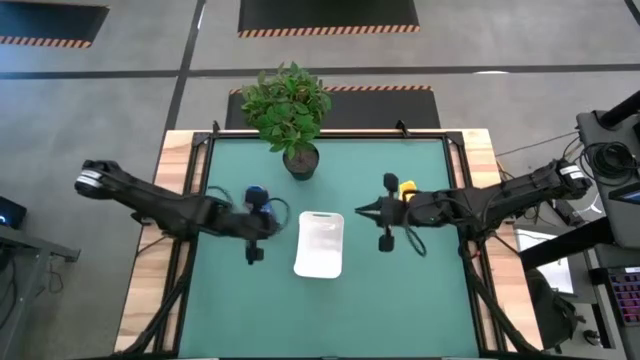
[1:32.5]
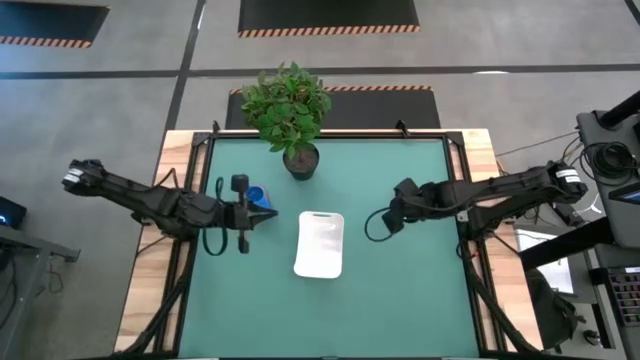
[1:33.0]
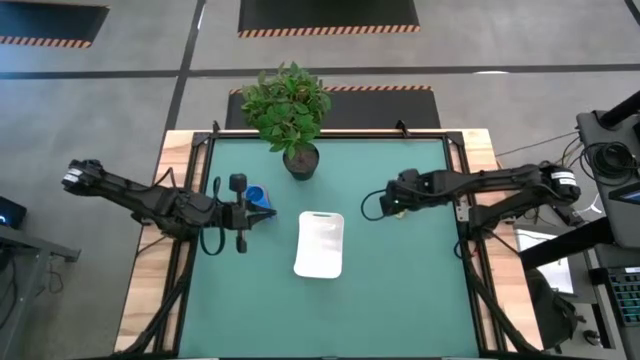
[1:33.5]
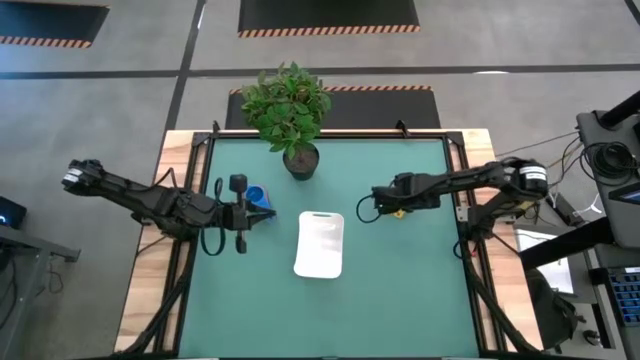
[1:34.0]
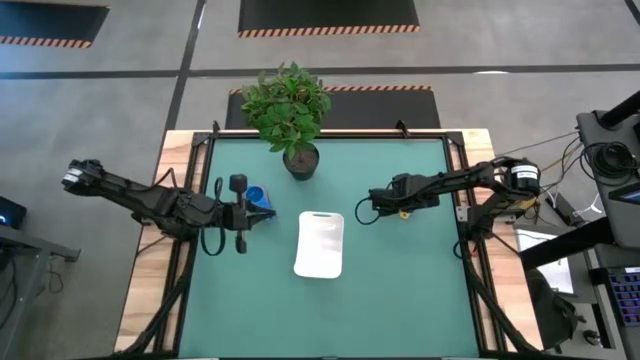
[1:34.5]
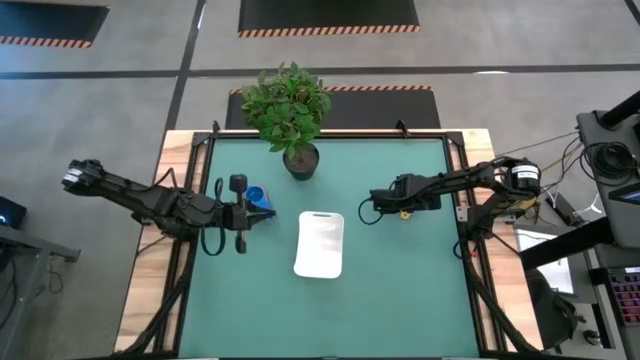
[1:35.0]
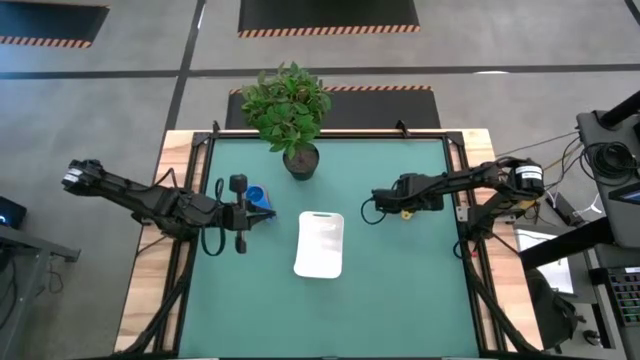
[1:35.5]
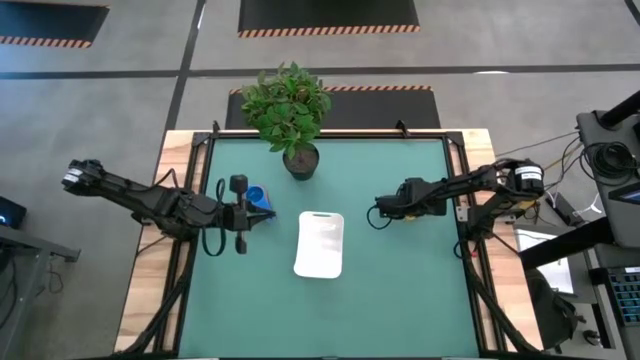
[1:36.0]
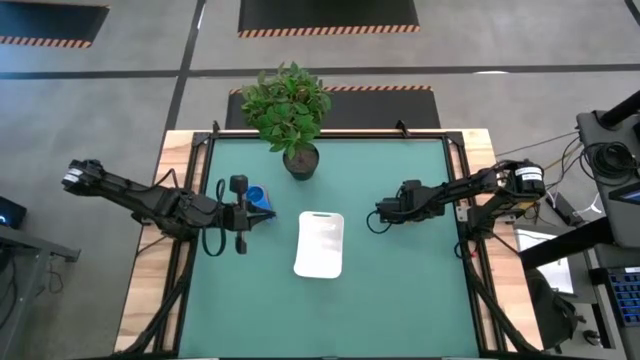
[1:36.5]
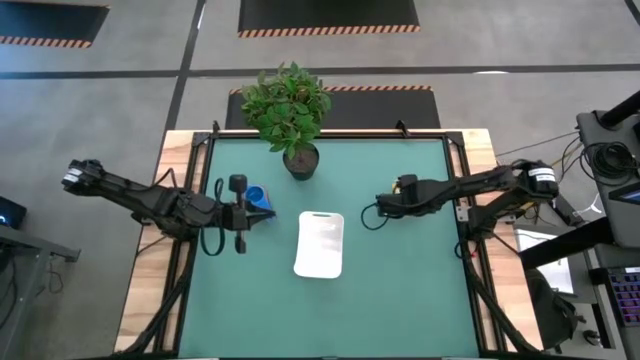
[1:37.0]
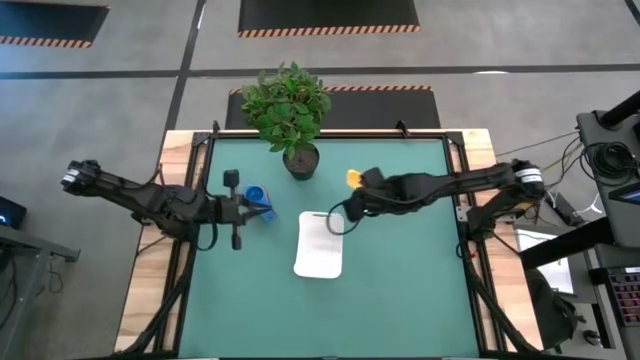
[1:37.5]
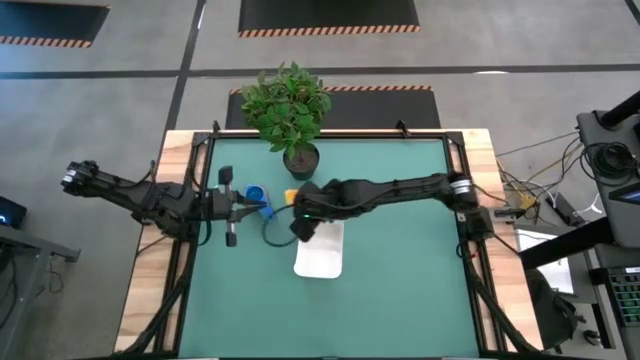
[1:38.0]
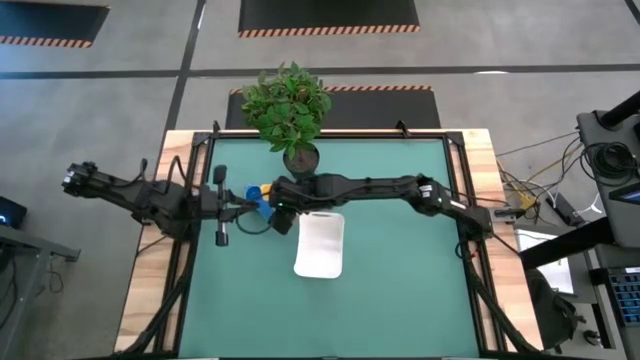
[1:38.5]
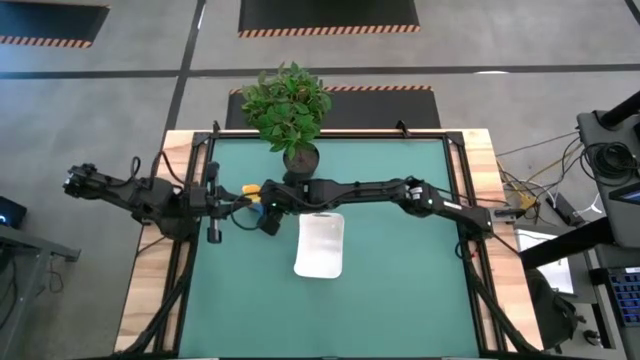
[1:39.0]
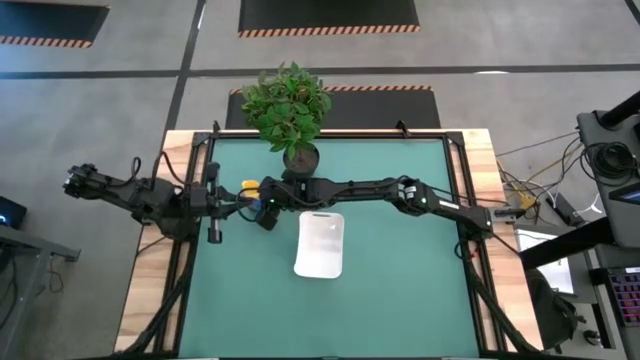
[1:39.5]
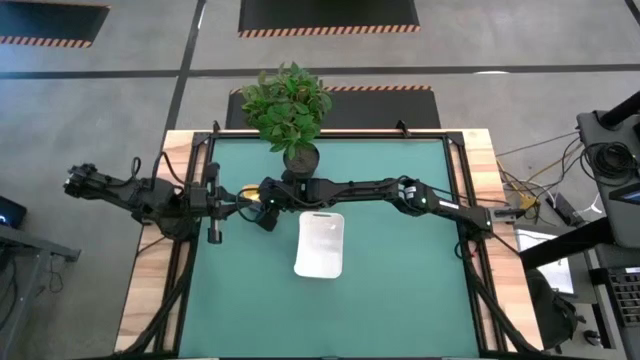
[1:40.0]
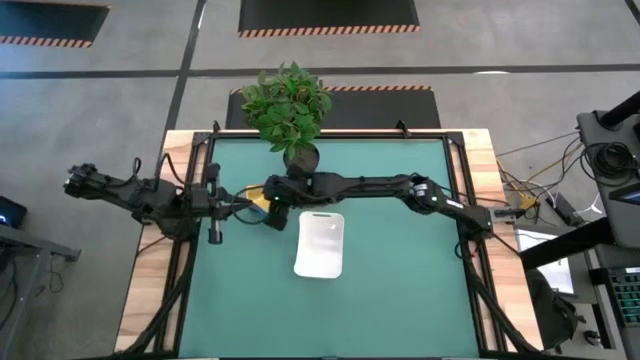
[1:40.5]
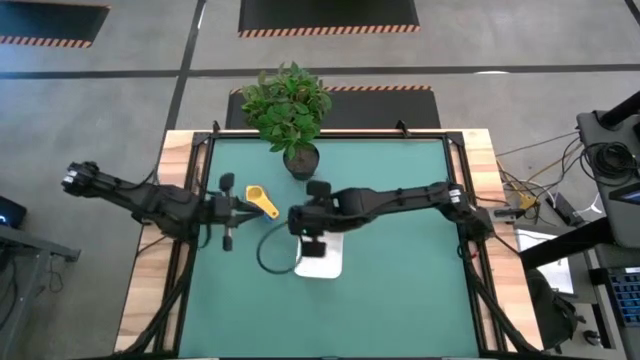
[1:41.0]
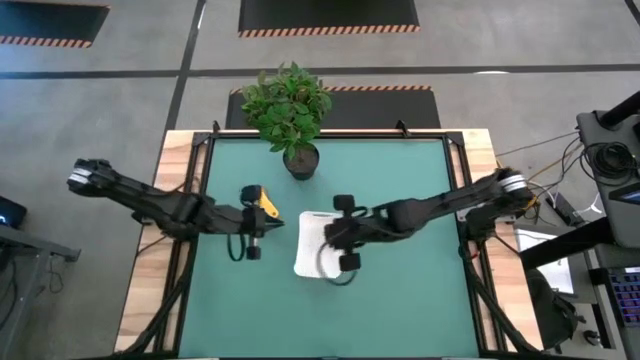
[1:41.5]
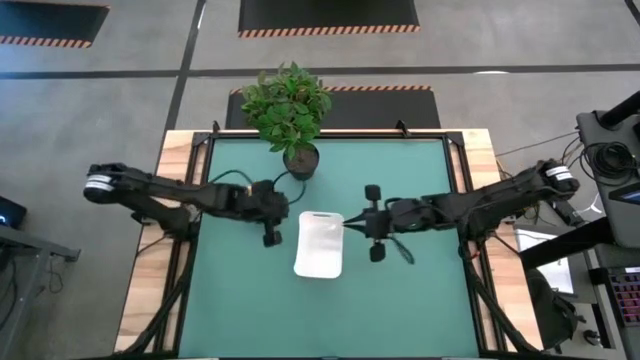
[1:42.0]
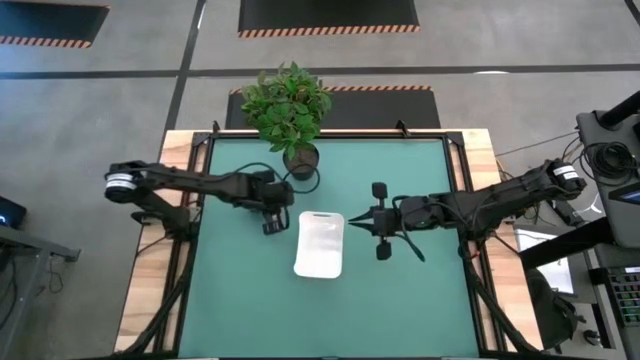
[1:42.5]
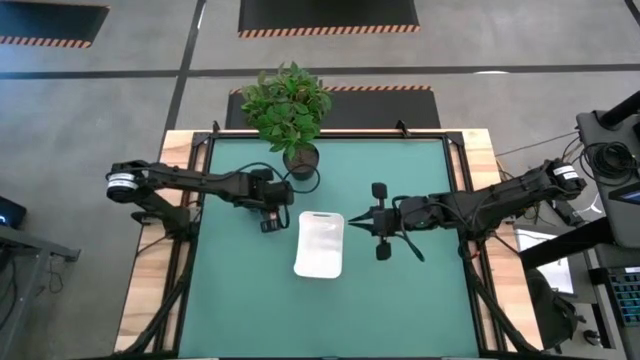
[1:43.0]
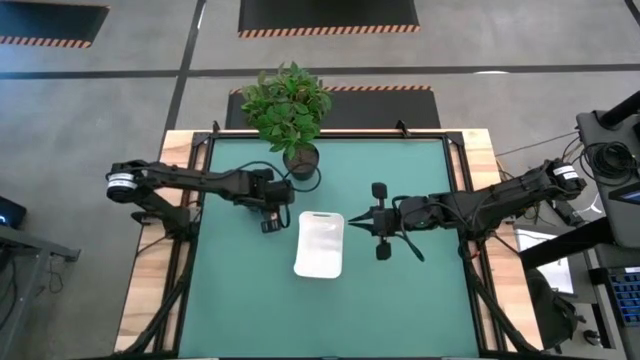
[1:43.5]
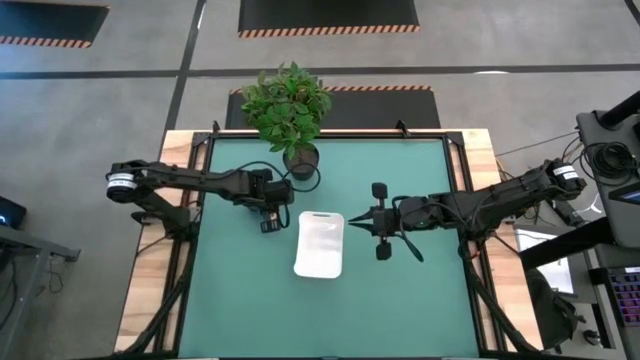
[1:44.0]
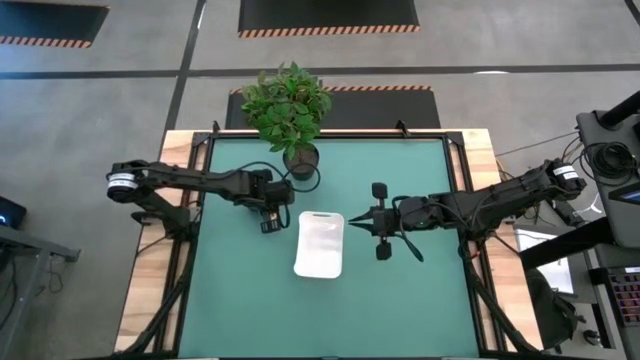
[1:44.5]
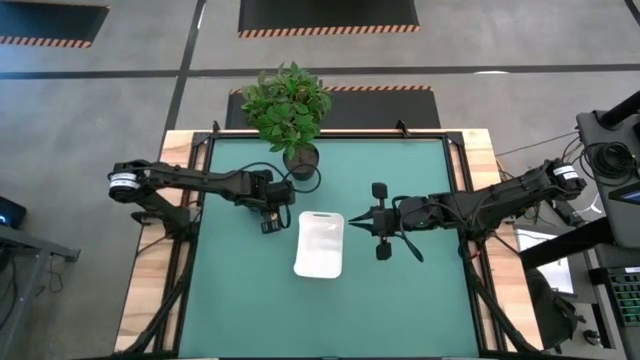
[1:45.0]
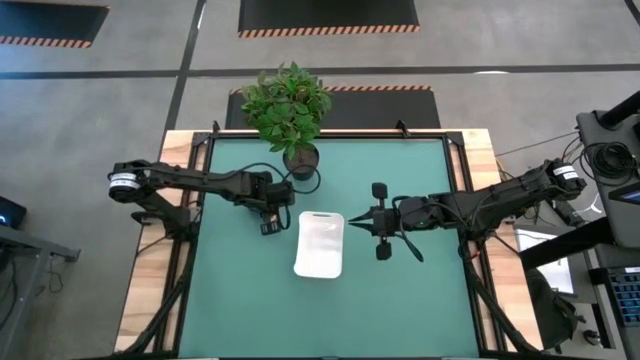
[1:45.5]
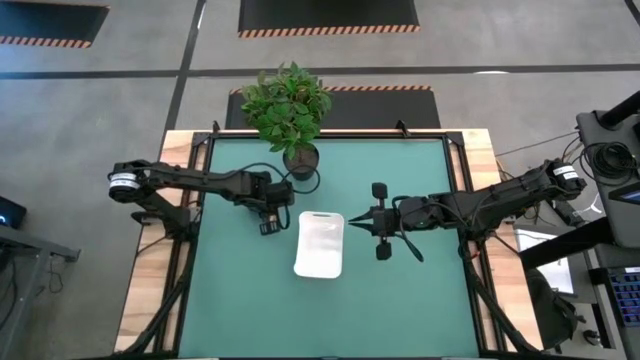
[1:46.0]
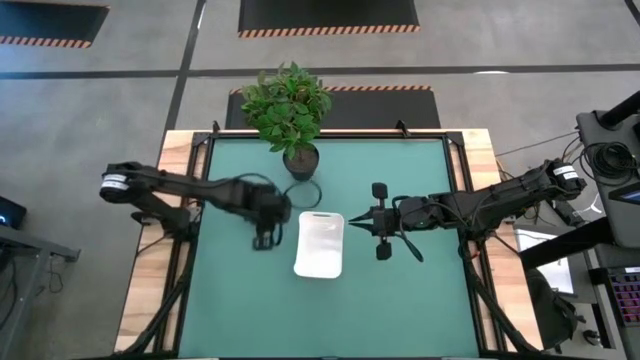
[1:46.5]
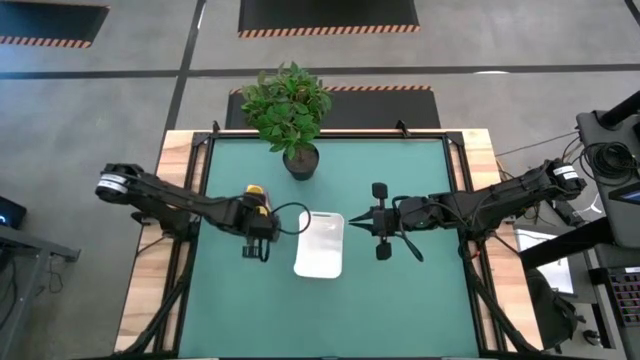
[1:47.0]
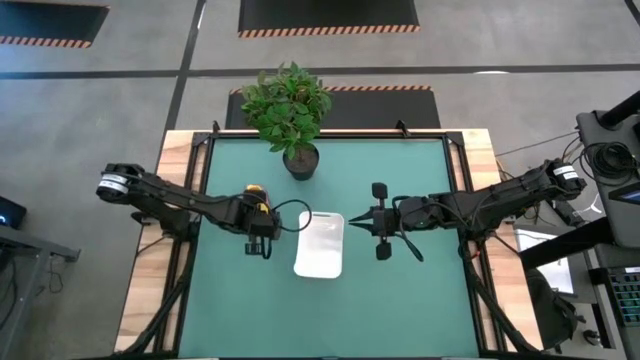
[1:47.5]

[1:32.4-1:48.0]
Task: Nest measuring cups in basket
Stack the yellow measuring cup on top of the blue measuring cup

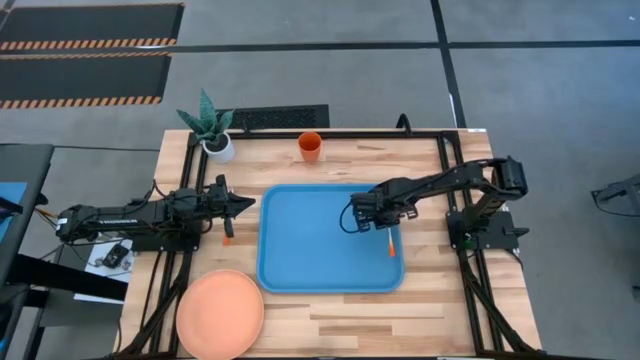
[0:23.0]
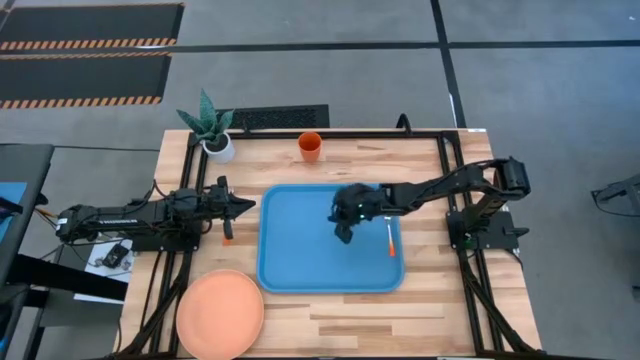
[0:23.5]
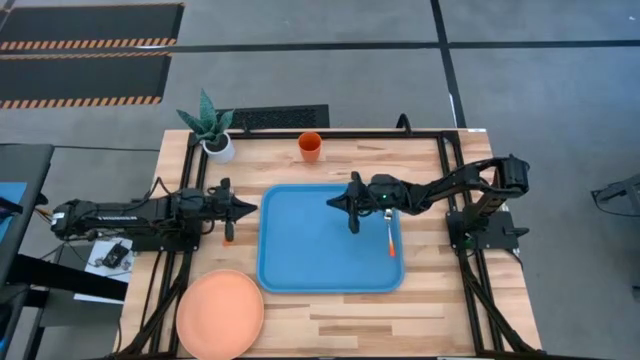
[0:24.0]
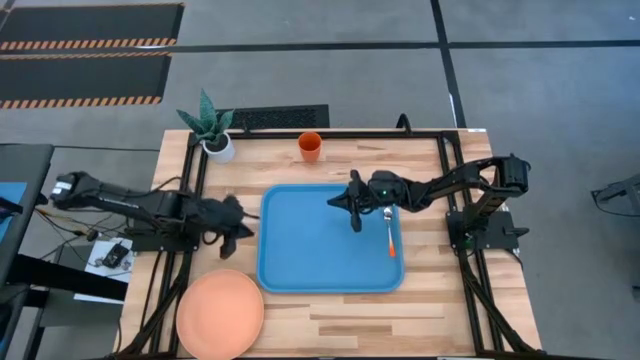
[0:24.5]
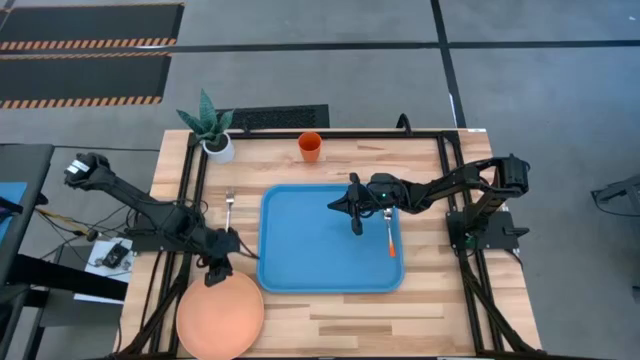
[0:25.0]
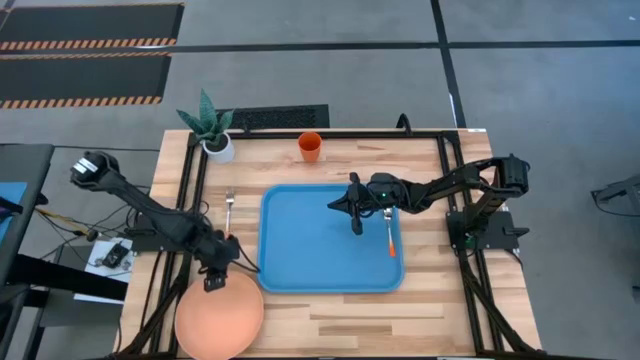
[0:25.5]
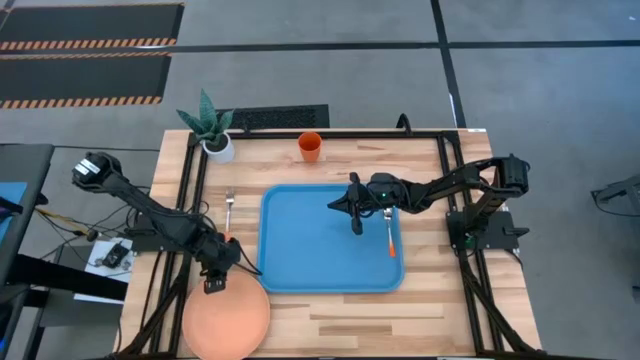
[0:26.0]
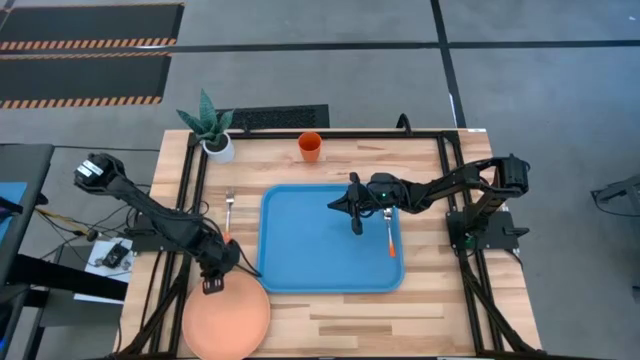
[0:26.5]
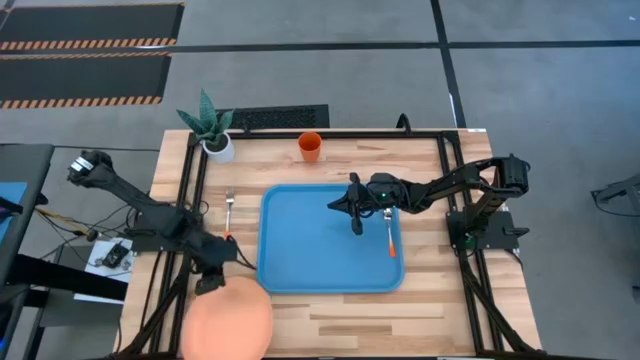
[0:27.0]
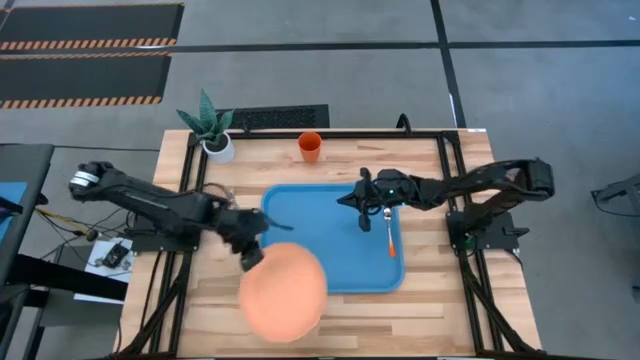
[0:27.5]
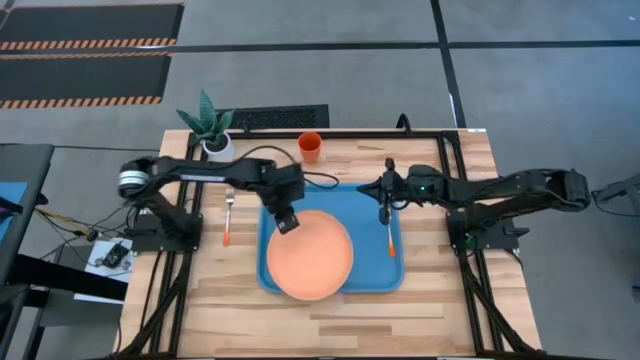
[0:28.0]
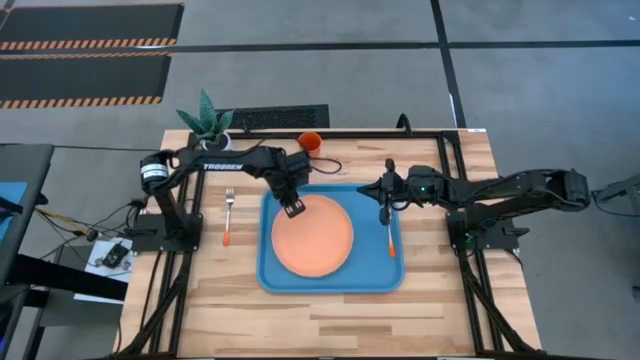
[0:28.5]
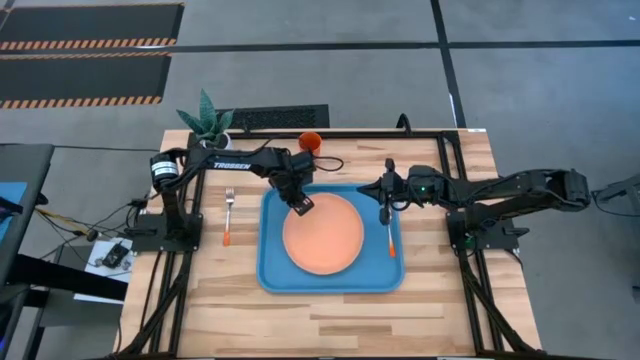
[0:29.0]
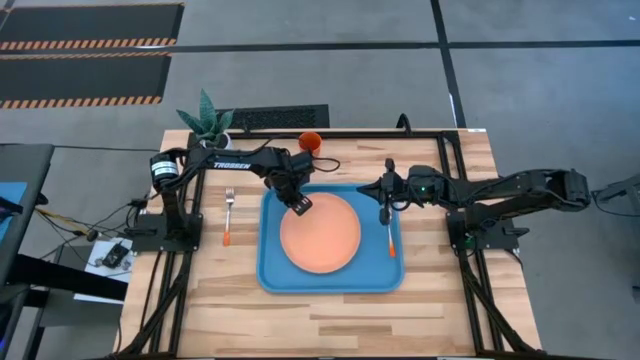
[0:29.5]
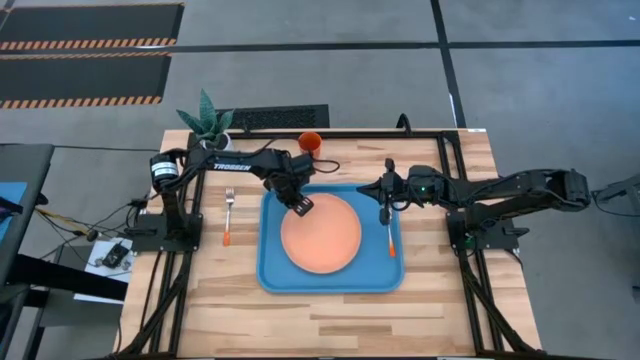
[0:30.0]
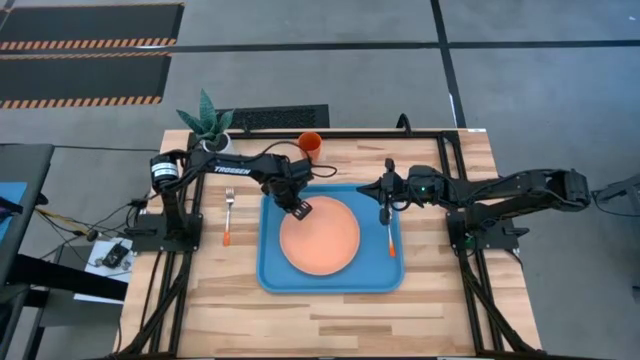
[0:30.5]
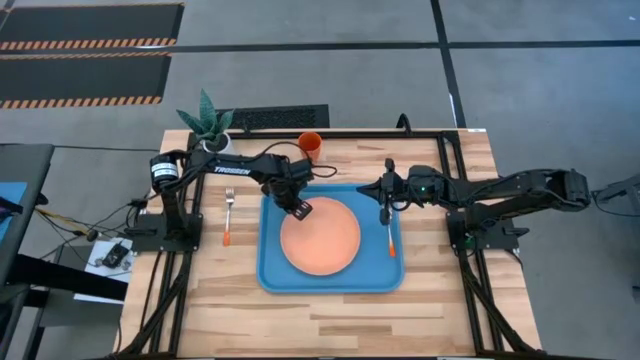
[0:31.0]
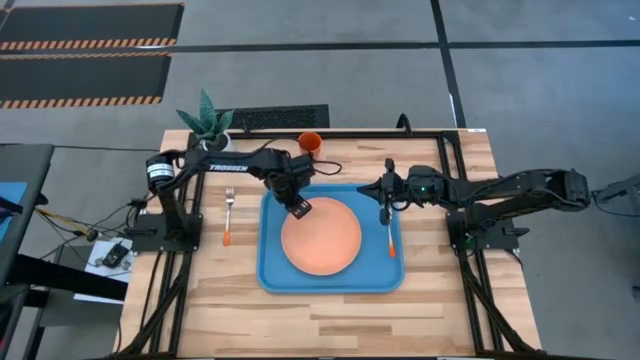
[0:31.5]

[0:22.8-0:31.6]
Task: Pick and place plate/cup/fork/spoon on tray
Put the orange plate on the blue tray to the left of the orange spoon
